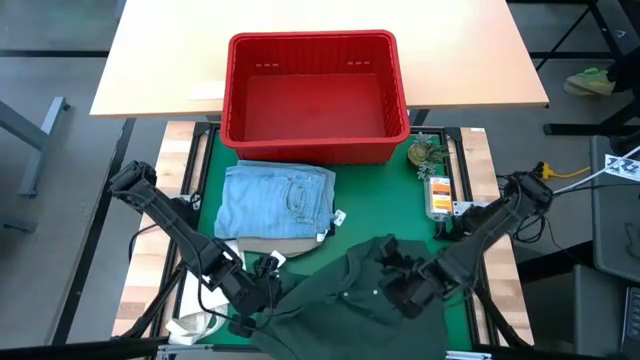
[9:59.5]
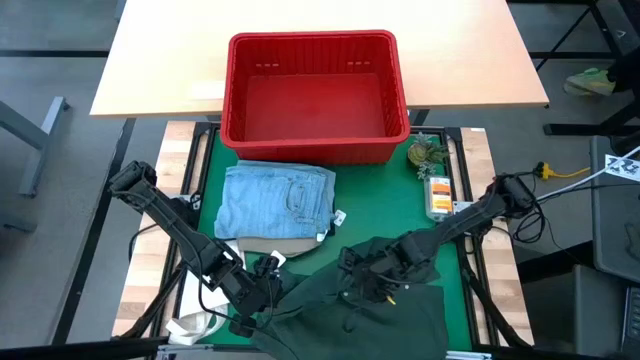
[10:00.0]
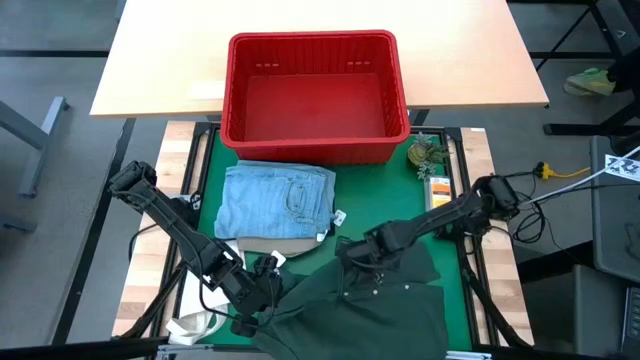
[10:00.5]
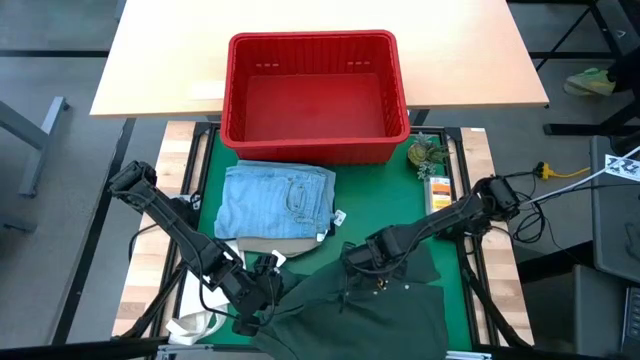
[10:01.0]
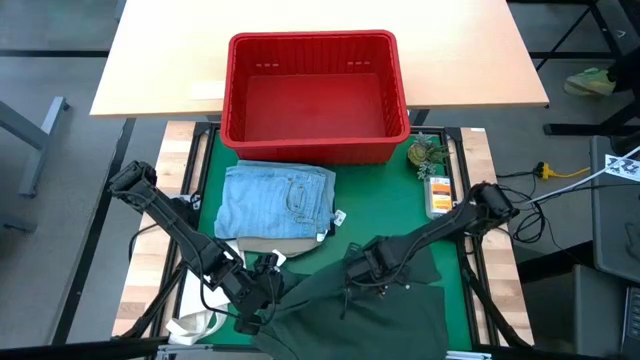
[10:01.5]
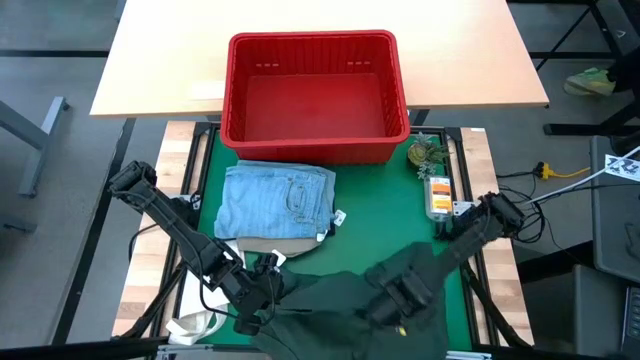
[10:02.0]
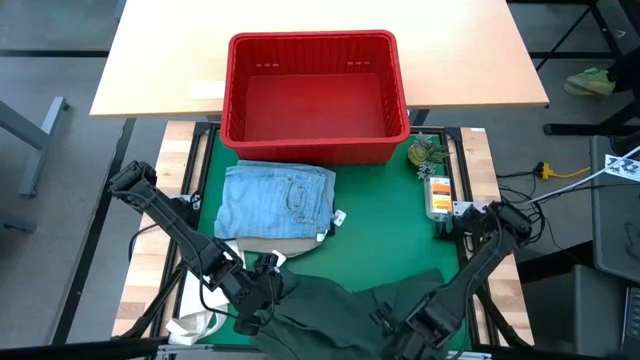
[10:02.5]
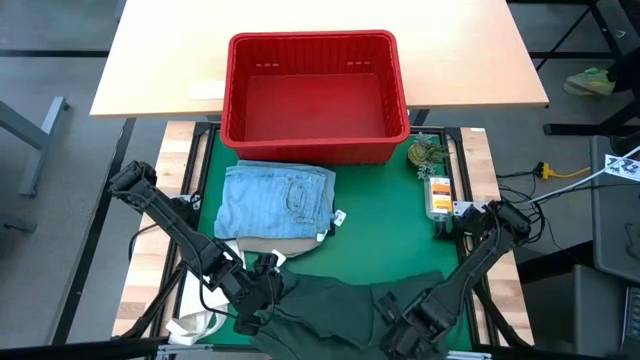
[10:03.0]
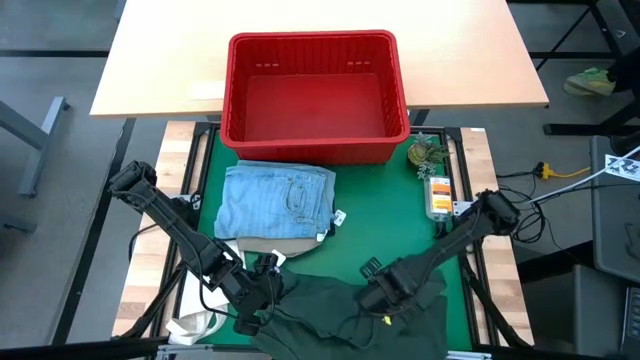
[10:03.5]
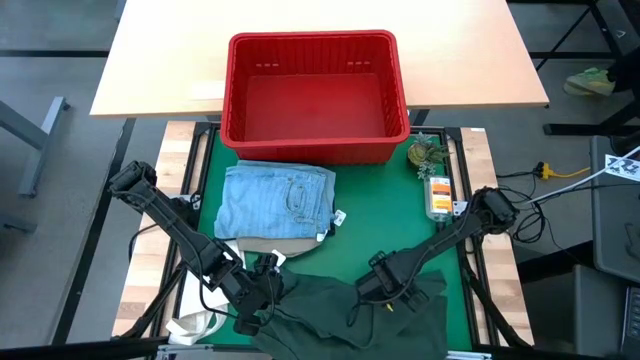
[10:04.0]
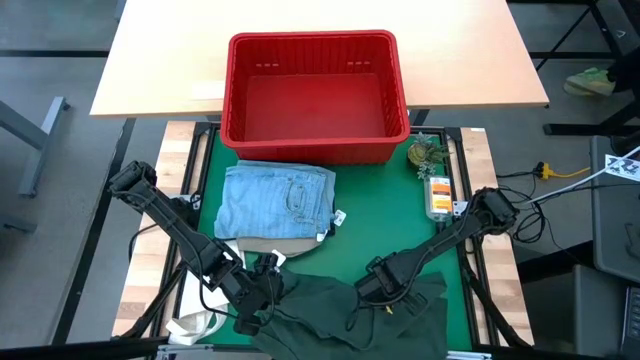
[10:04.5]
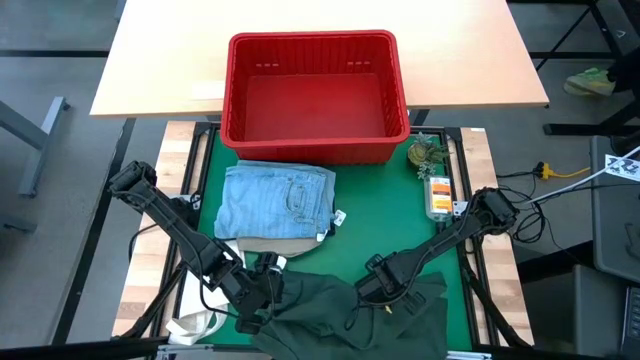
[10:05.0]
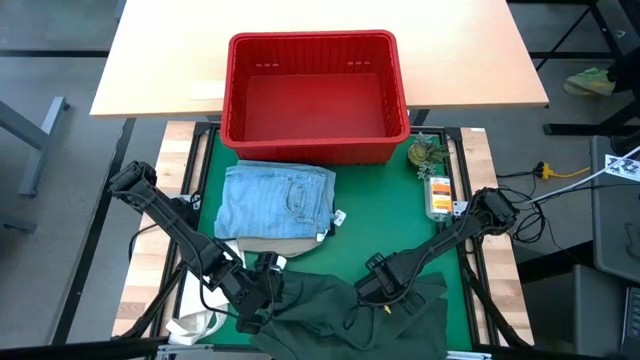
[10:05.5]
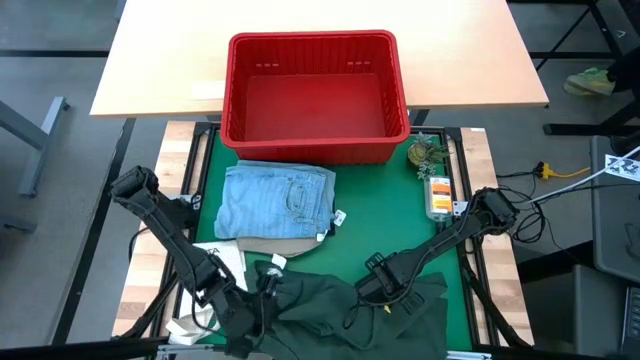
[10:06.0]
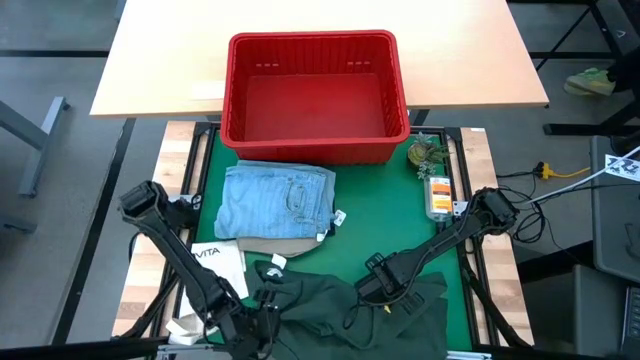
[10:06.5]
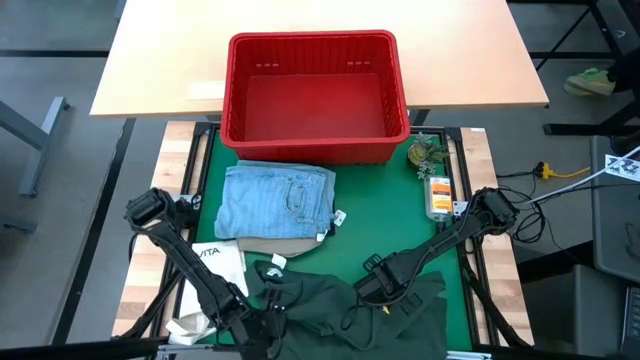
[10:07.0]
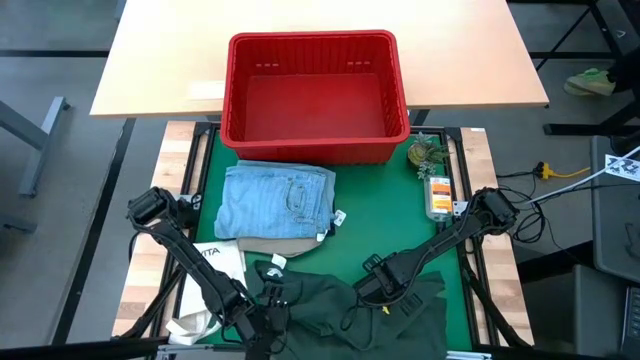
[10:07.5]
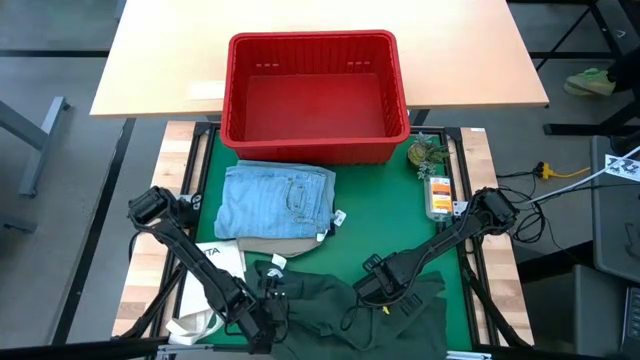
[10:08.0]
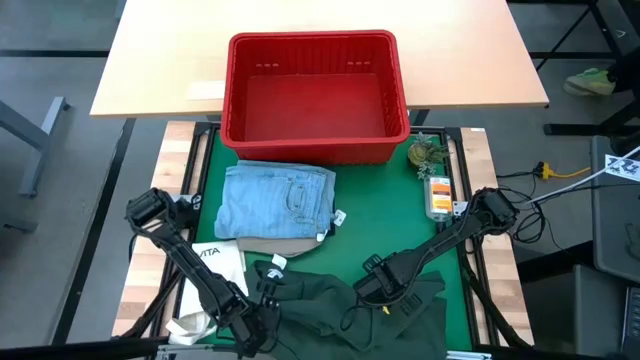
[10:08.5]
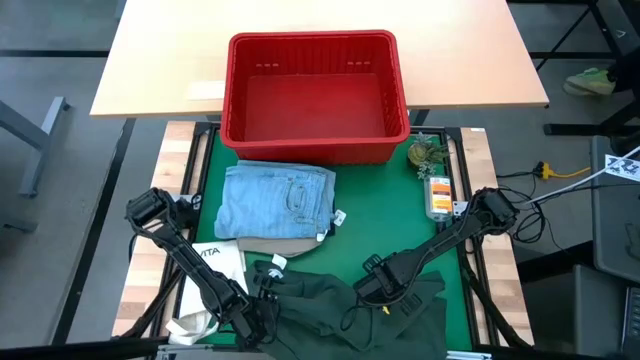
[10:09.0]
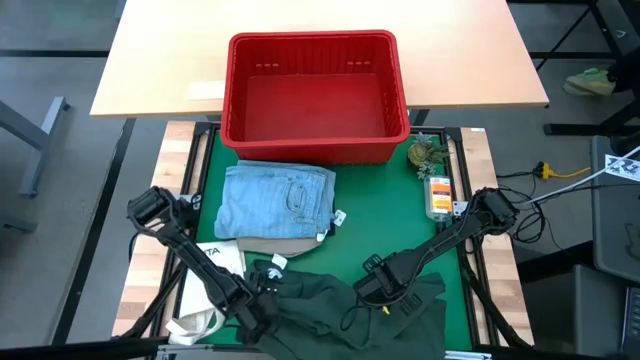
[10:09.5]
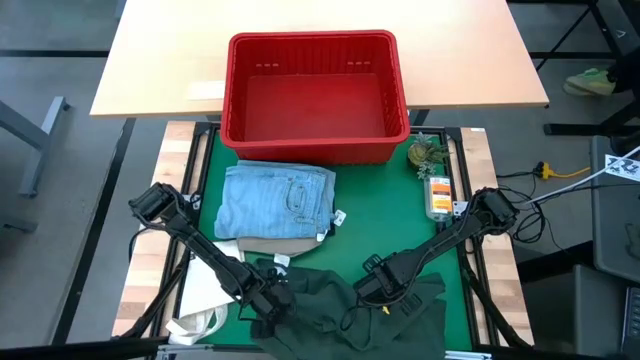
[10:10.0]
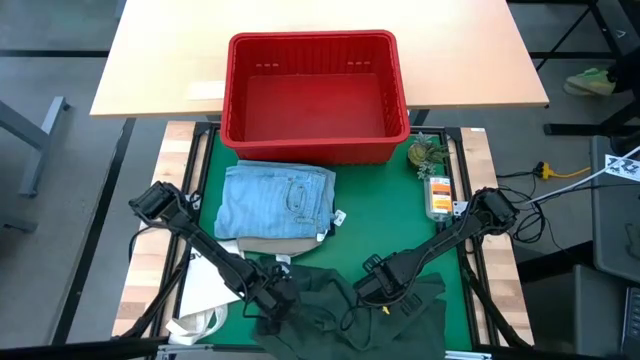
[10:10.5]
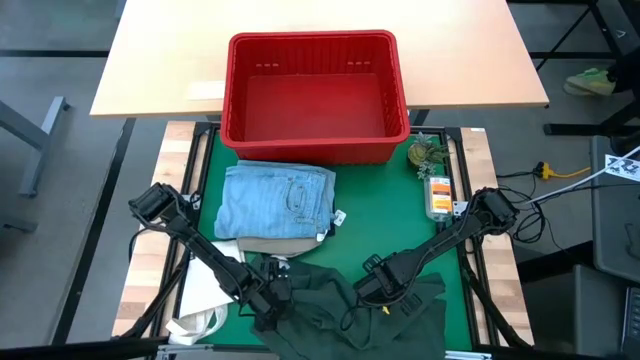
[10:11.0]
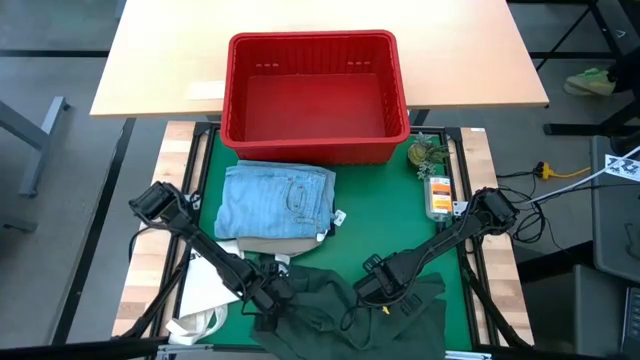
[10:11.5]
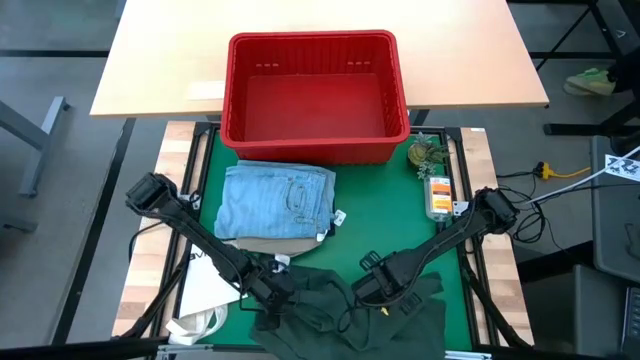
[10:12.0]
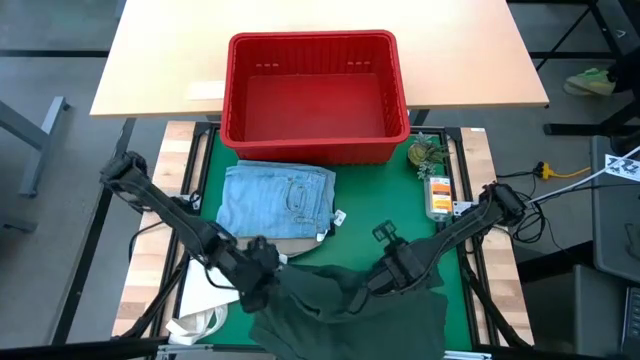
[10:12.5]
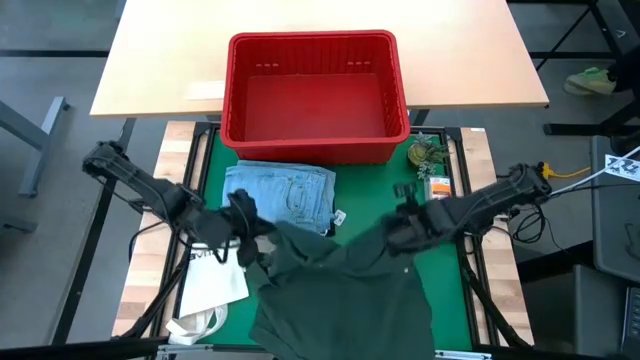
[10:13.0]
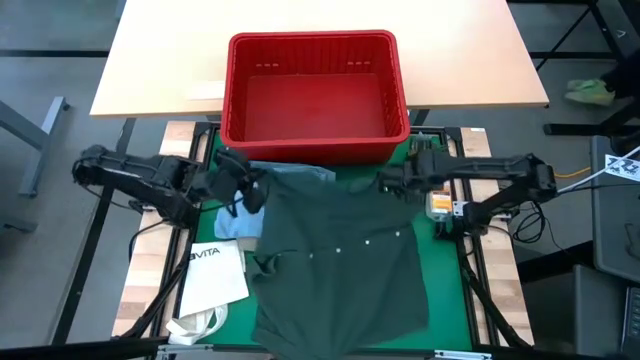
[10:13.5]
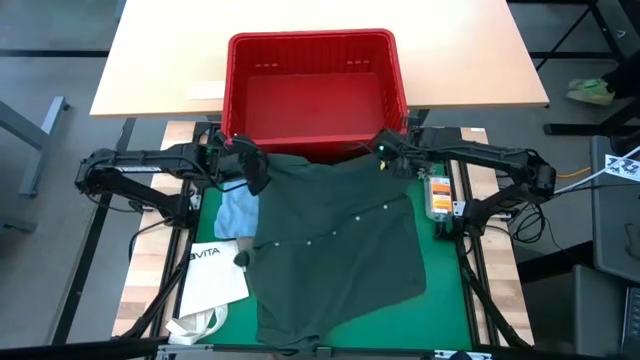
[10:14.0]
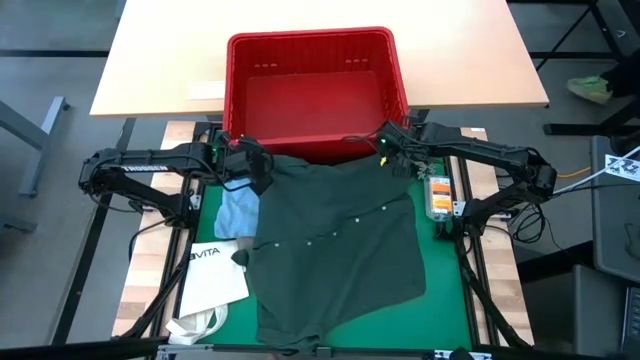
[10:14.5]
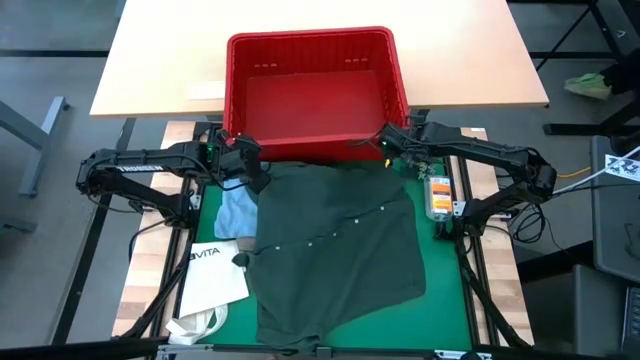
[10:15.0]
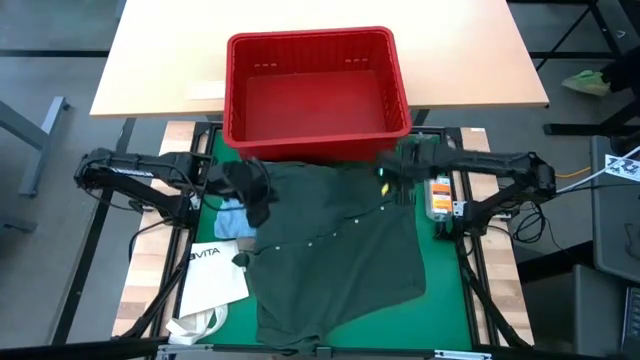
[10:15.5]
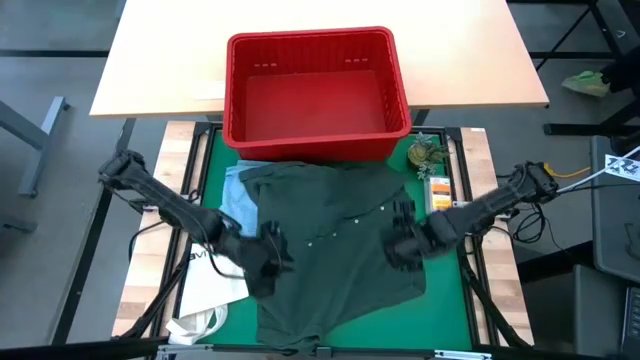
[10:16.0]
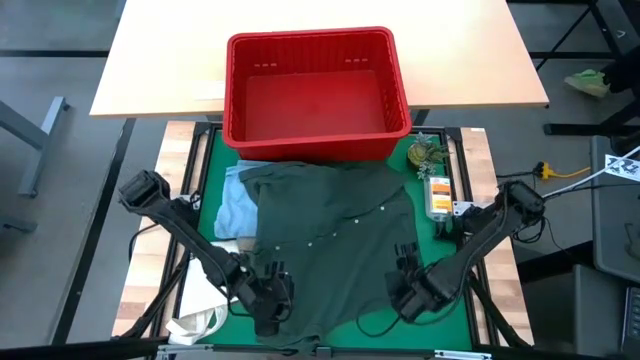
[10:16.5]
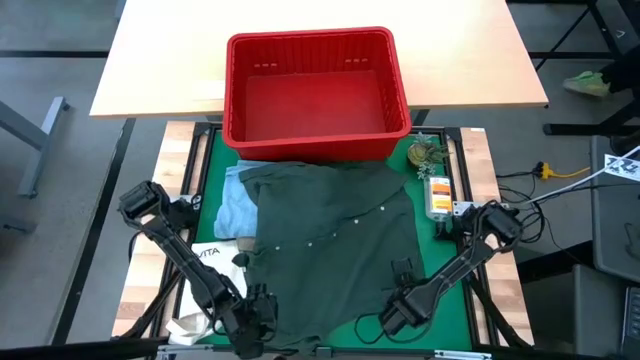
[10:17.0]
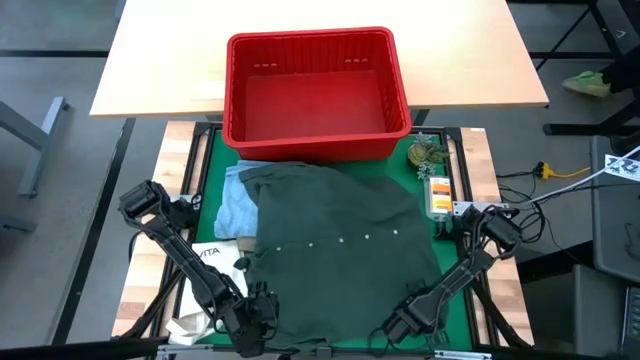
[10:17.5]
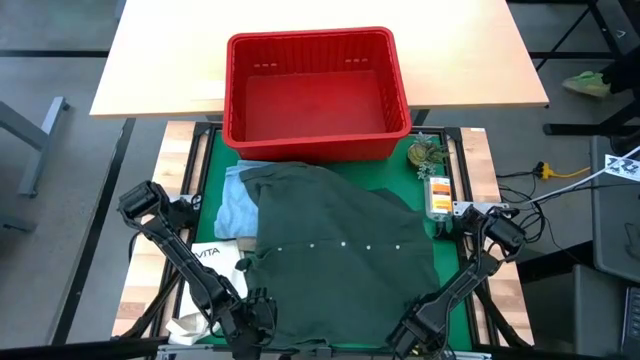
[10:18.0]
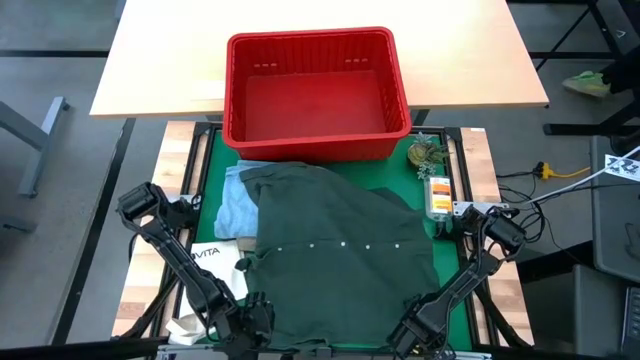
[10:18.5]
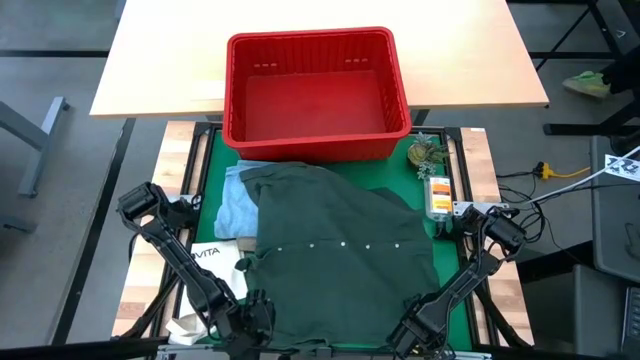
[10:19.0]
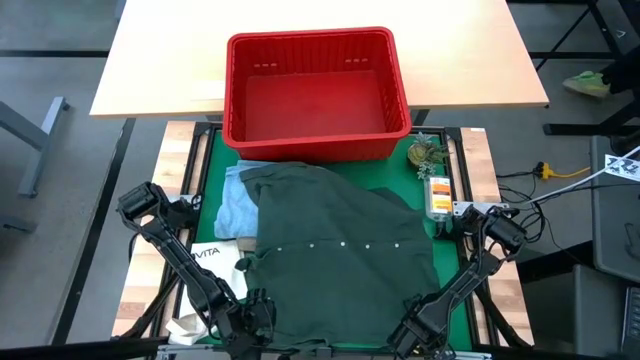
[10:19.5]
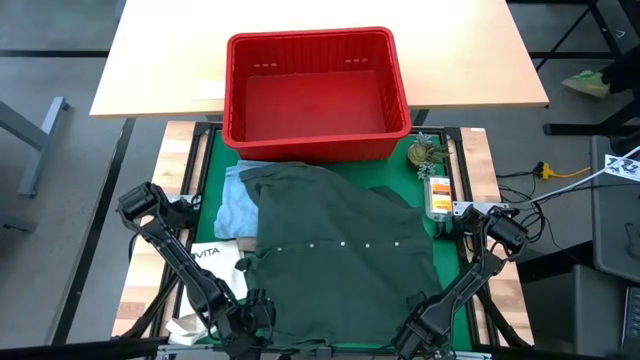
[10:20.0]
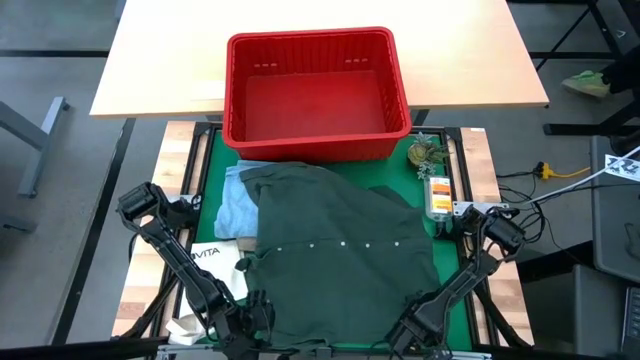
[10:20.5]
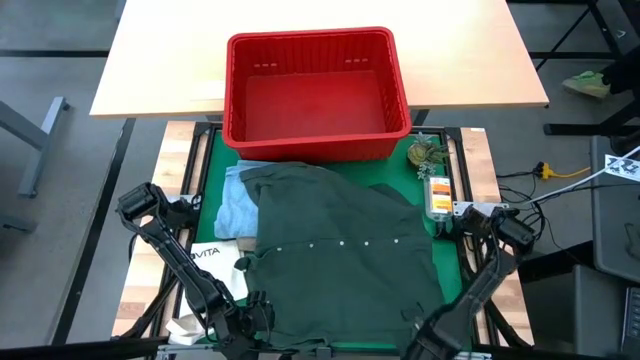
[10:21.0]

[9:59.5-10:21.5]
Task: Fold Laundry from Bin
Fold the green polo shirt
